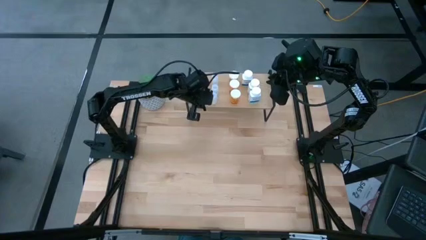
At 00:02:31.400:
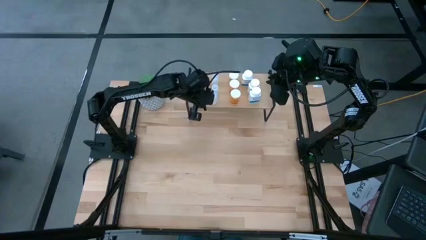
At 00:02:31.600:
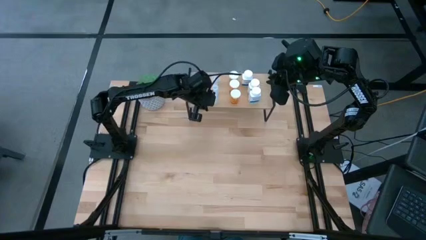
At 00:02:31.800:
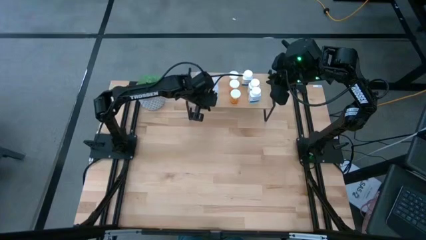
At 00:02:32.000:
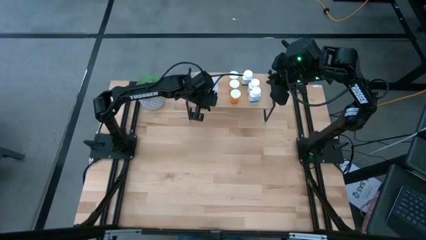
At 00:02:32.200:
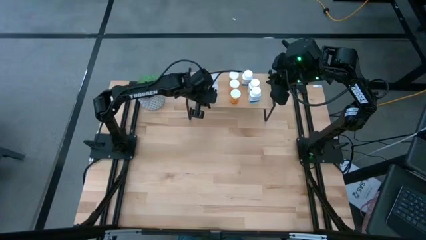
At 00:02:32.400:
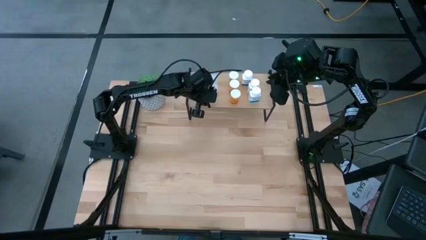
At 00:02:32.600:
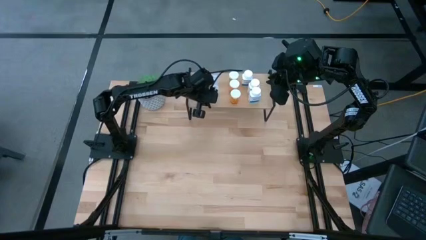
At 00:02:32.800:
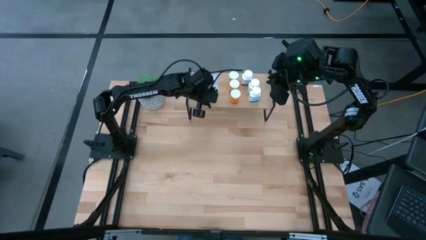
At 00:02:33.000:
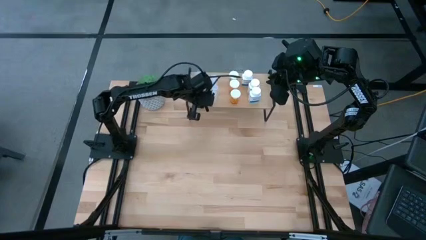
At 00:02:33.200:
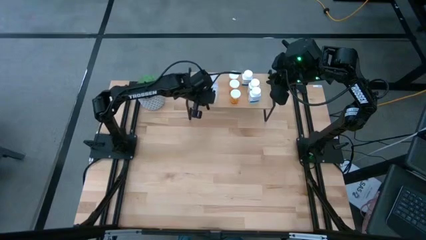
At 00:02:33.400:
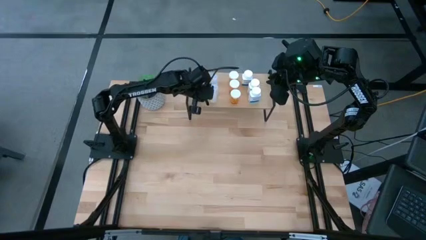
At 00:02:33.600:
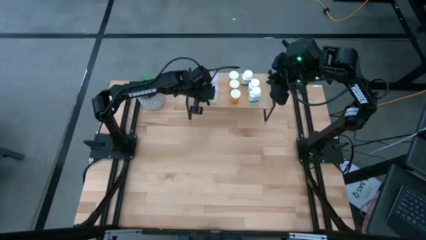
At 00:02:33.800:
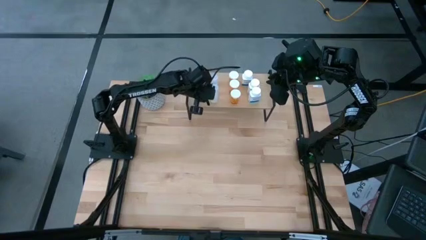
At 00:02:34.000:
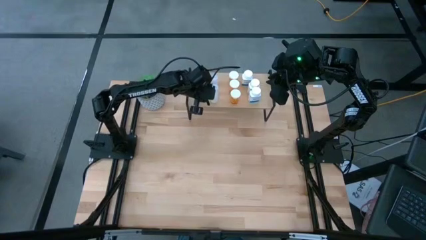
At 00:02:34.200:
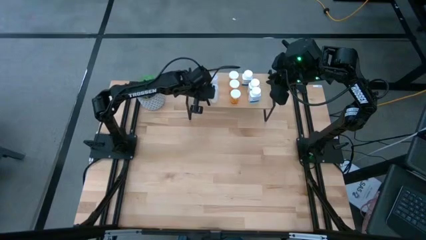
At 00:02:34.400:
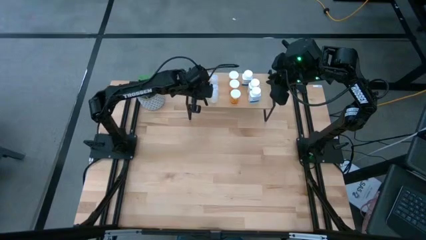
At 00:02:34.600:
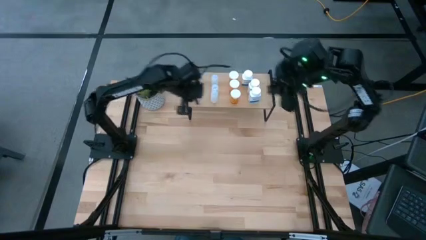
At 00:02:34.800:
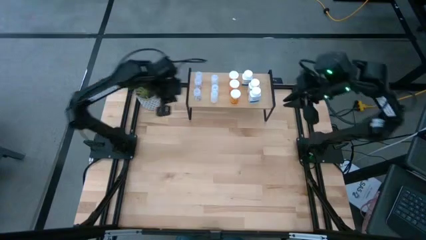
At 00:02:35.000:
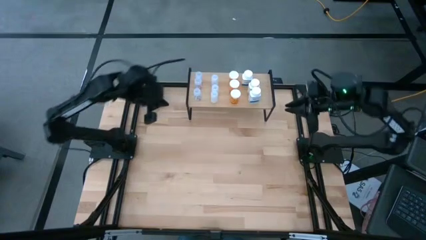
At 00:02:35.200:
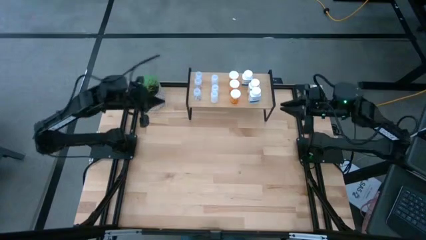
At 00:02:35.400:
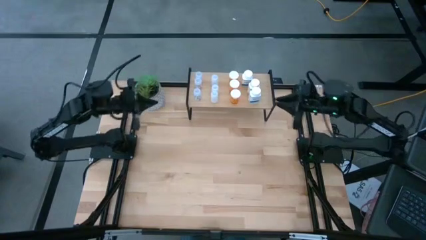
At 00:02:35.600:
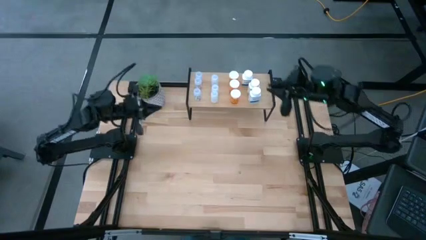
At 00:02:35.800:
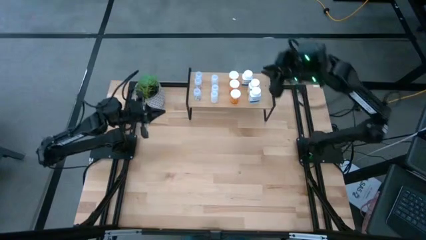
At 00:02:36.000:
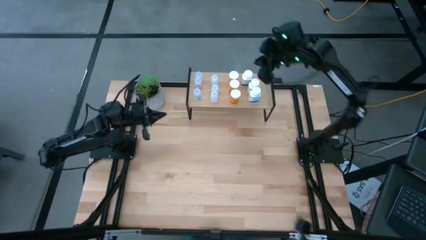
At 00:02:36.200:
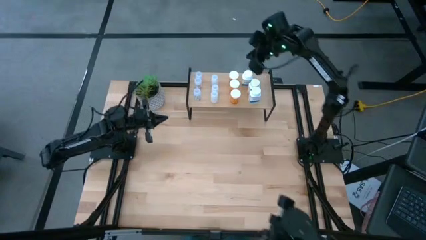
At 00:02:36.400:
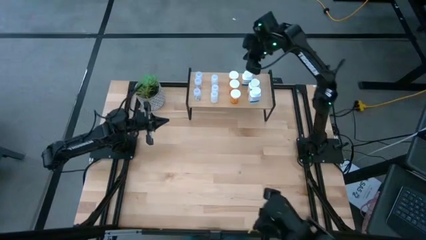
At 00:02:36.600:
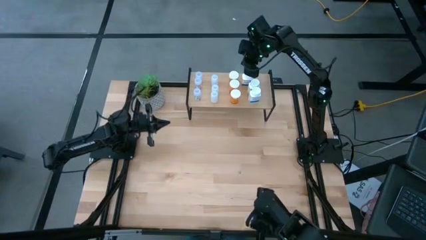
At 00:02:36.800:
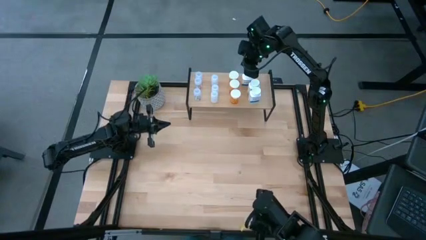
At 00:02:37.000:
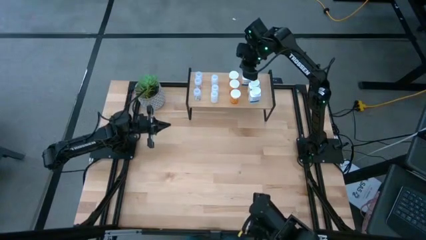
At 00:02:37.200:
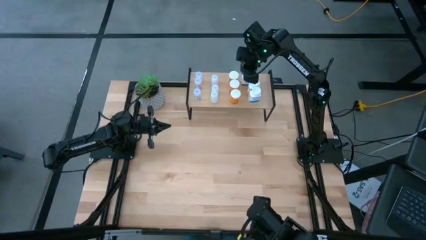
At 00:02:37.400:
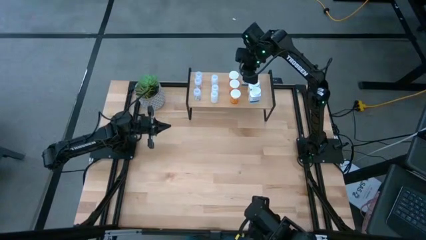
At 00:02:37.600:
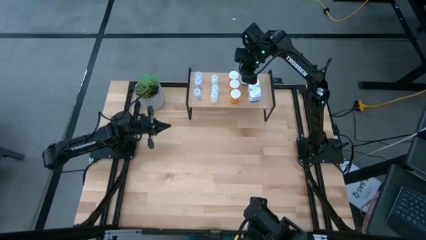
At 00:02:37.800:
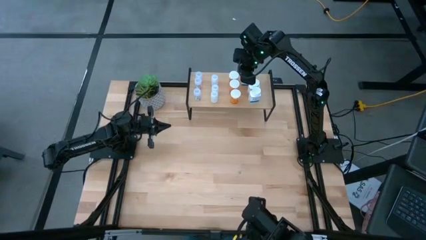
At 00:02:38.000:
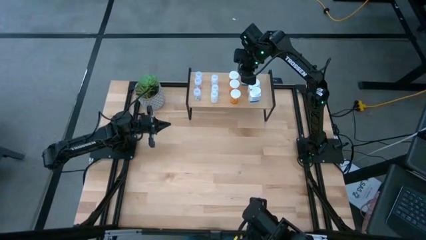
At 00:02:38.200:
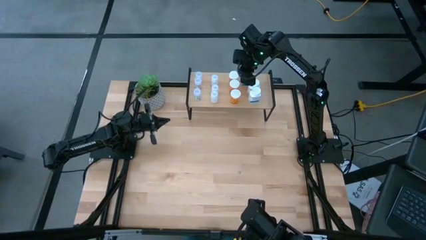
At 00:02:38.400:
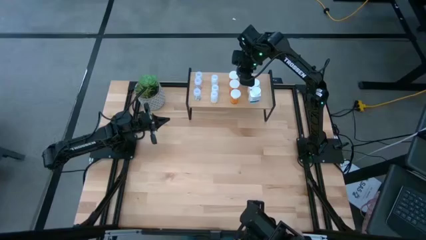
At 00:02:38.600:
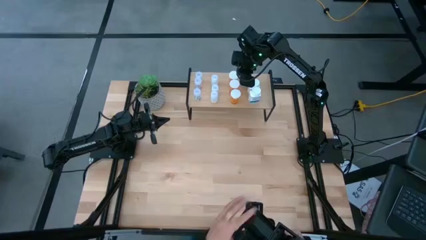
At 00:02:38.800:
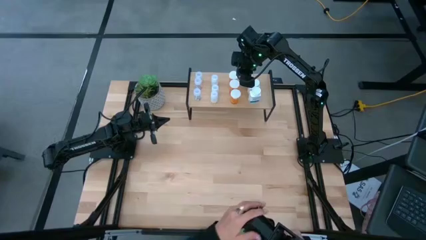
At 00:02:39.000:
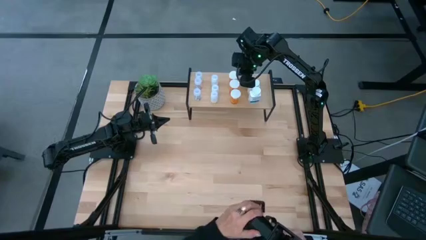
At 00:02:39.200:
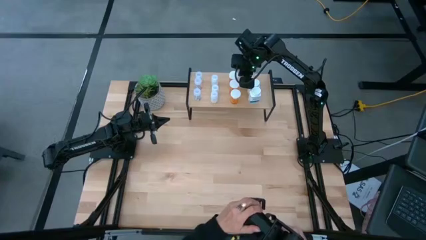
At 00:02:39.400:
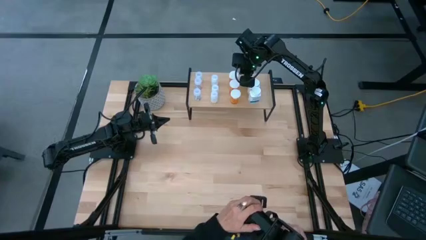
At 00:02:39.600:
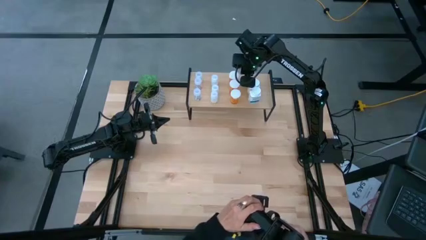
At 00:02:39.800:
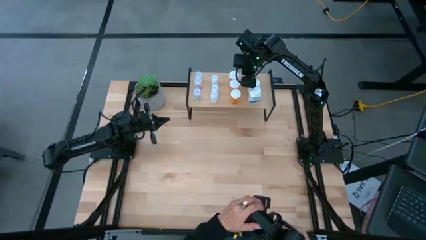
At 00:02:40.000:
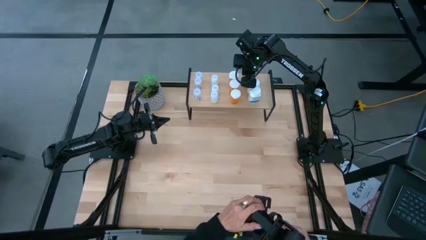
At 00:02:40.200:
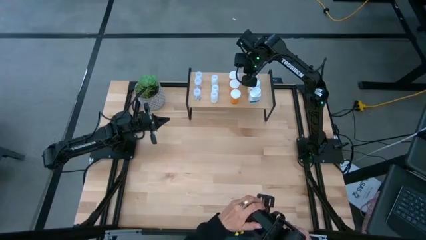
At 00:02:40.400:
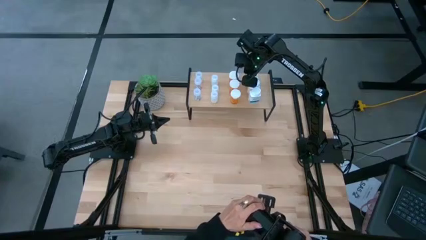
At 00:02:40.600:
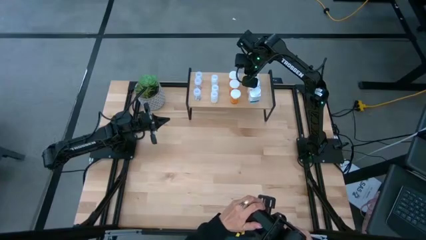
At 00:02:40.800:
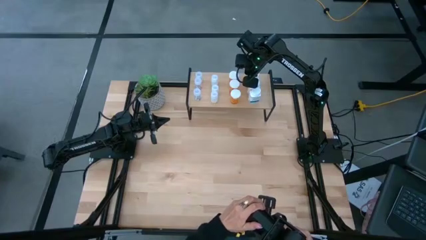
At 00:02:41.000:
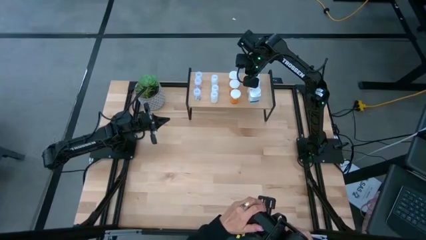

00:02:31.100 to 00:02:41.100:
Task: Pick and place medicine bottles onto shelf by color
Adjust the pill bottles on the shelf

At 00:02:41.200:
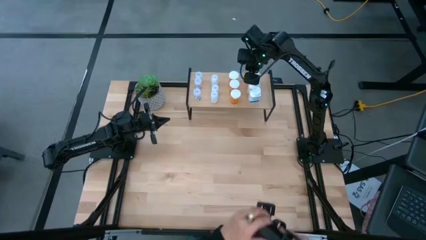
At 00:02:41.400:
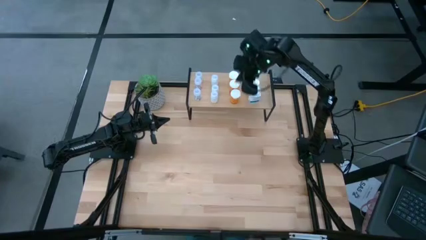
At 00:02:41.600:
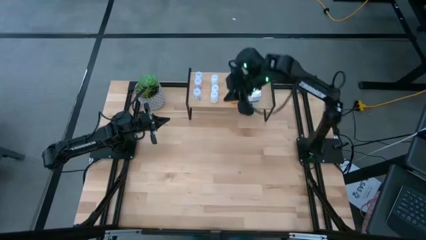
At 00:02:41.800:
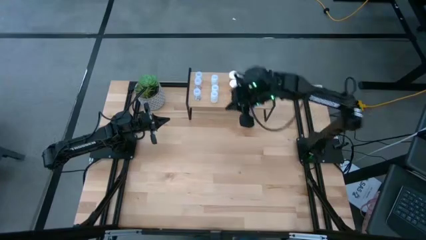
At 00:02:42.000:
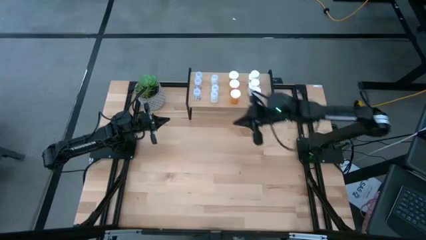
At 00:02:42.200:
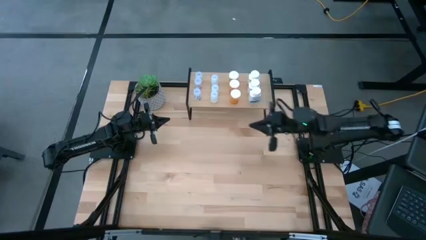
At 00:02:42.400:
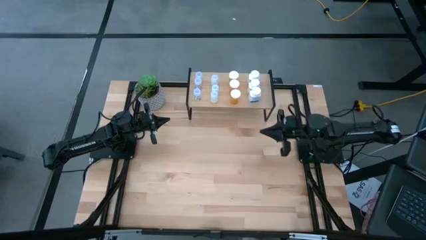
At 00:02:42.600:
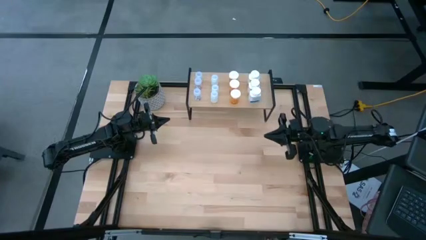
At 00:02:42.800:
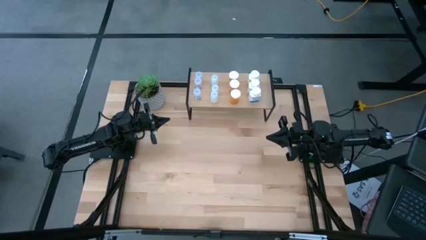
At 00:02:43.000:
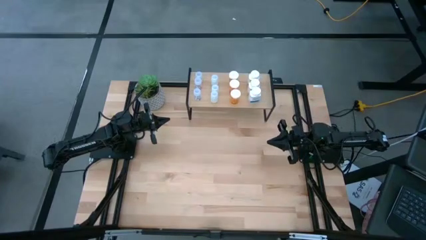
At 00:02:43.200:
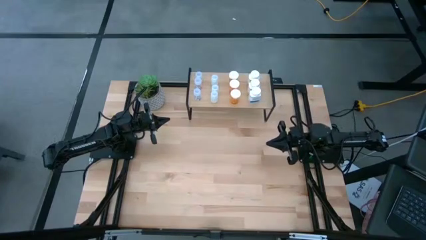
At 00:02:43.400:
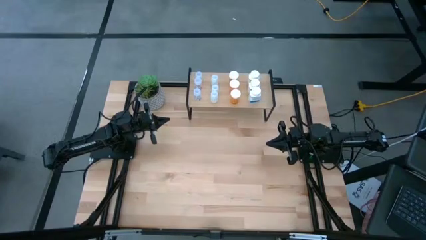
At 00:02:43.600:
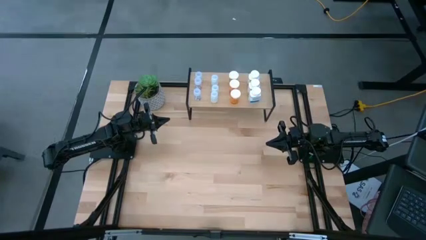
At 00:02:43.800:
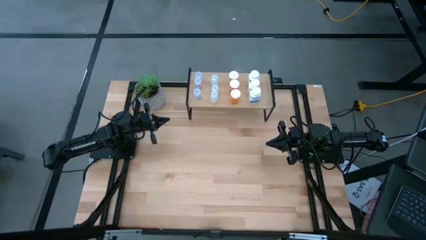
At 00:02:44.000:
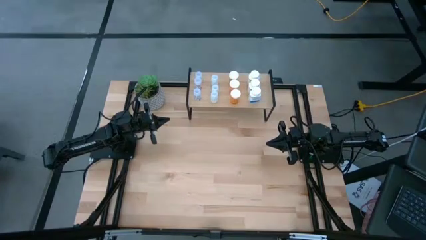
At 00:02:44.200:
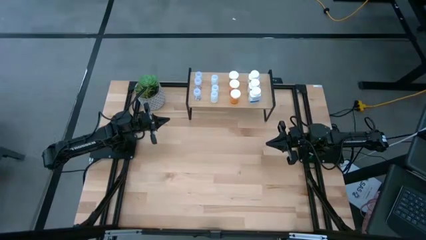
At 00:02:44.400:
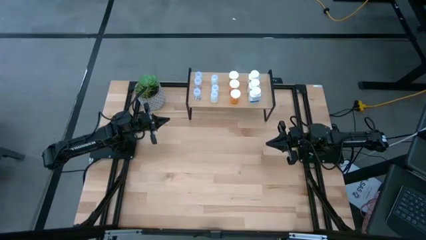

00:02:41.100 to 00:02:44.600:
Return to Home Position

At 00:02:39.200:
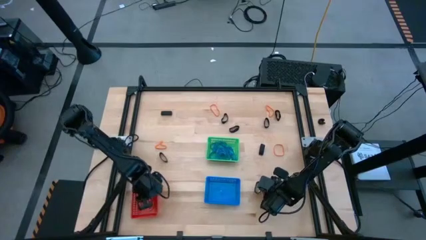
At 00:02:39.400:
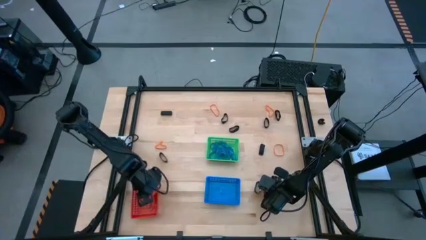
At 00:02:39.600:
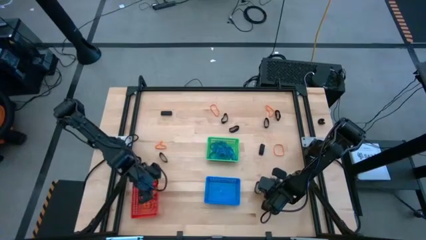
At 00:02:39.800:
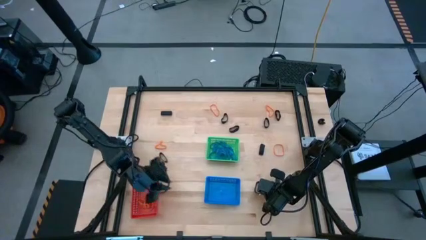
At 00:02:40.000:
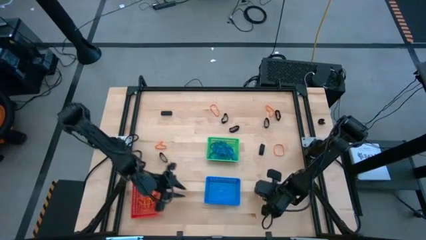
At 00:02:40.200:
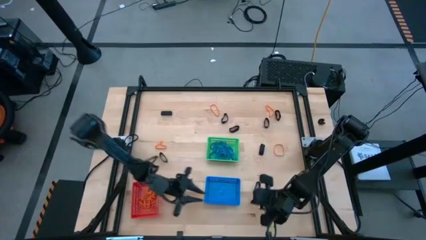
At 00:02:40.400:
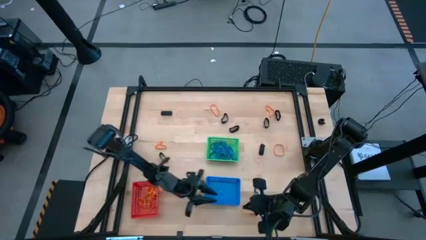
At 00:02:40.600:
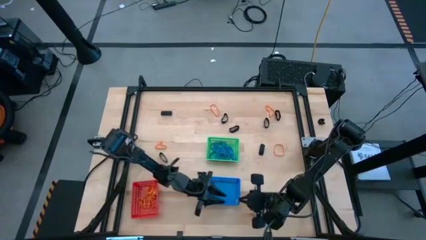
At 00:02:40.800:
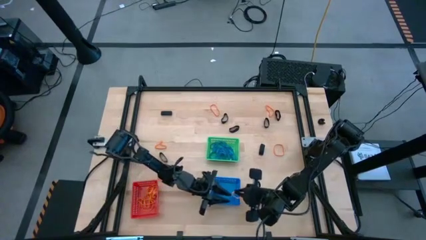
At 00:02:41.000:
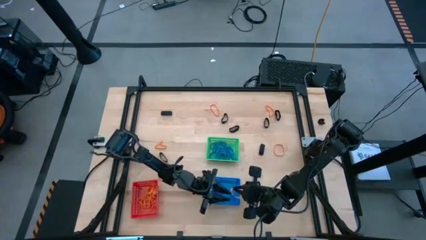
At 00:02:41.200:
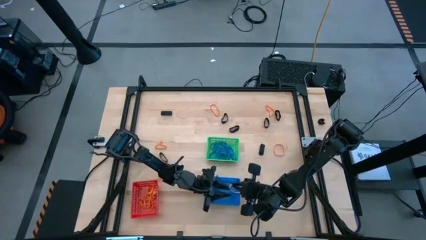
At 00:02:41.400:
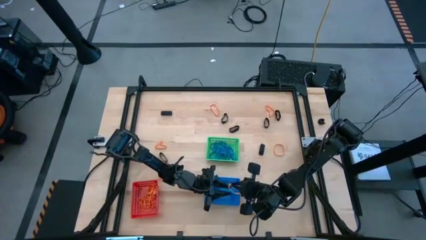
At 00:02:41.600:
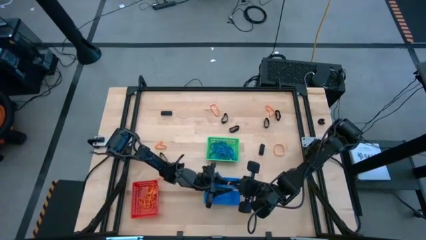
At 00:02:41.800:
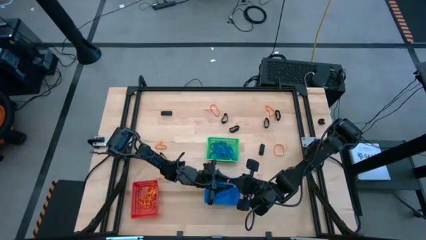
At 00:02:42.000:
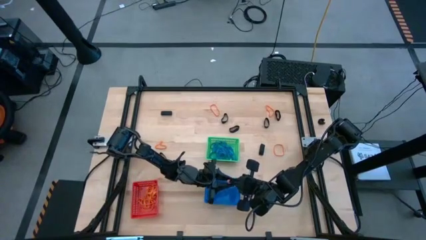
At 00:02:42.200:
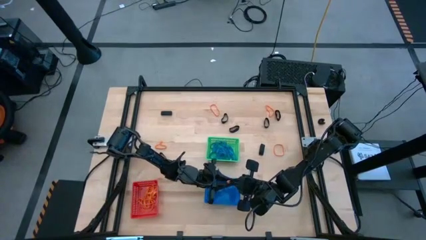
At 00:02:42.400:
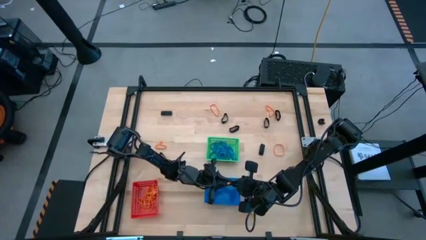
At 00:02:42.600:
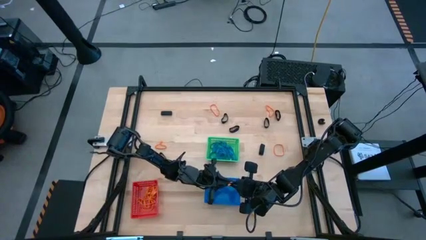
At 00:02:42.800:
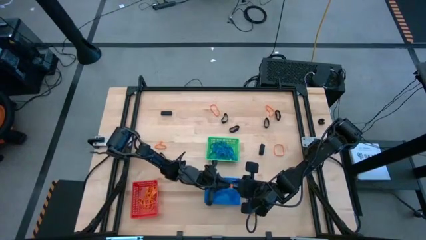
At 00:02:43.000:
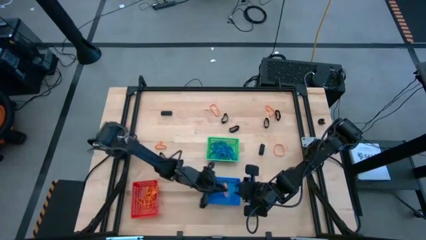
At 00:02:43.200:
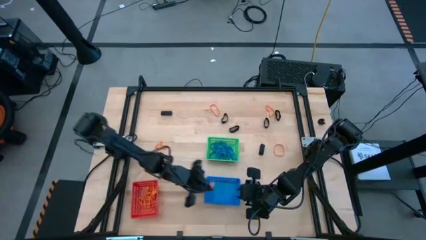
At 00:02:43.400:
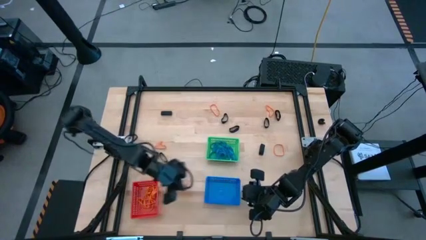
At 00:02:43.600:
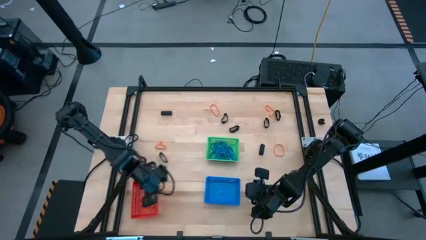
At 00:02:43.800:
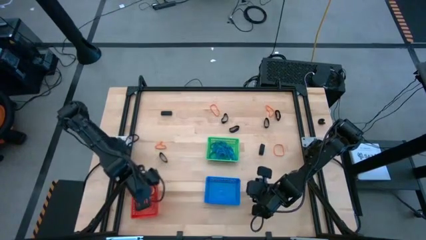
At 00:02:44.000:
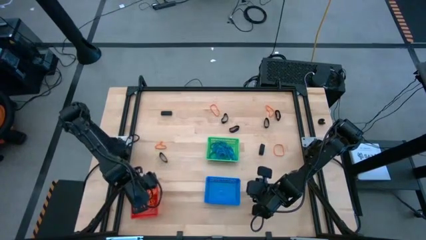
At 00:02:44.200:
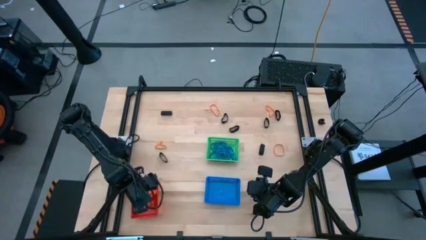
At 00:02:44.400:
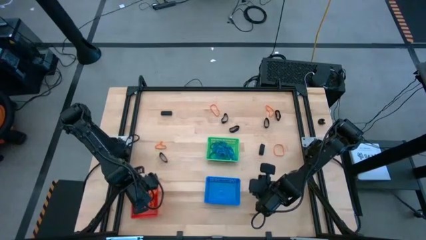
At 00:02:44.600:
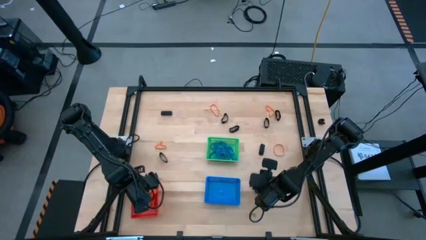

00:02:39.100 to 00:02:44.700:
Task: Sort rubber bands into baskets
Put the orange rubberband into the red bin
